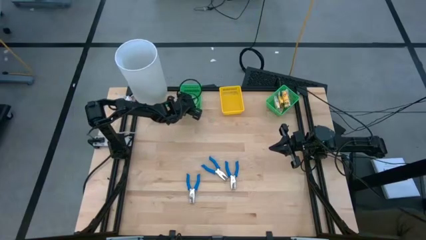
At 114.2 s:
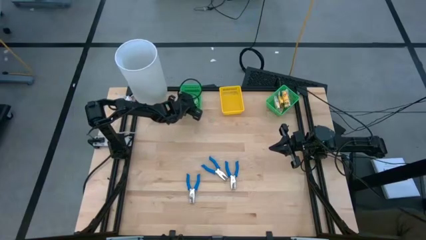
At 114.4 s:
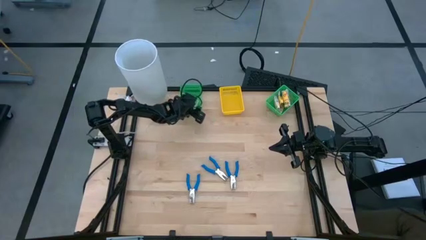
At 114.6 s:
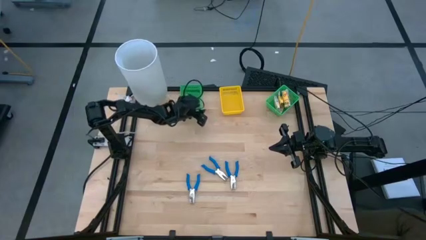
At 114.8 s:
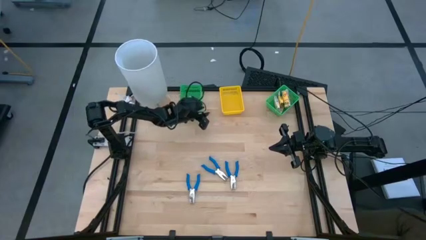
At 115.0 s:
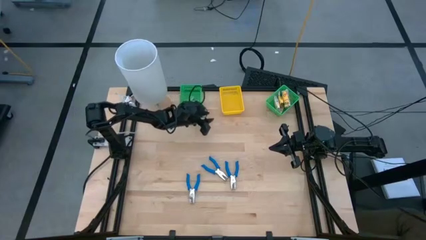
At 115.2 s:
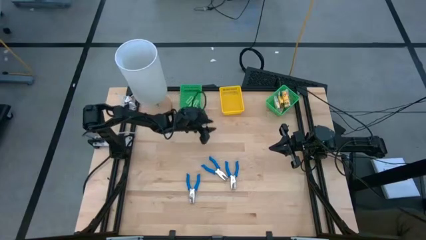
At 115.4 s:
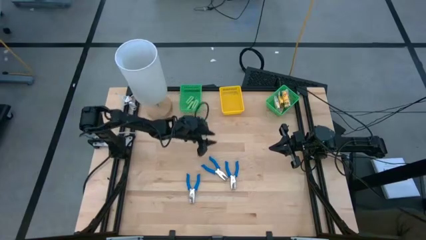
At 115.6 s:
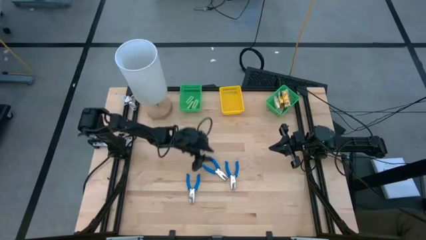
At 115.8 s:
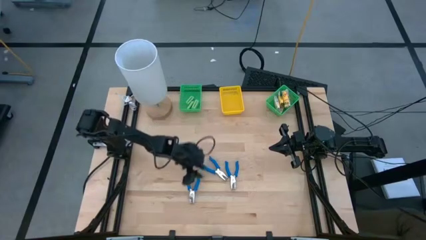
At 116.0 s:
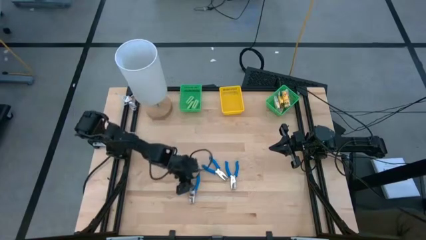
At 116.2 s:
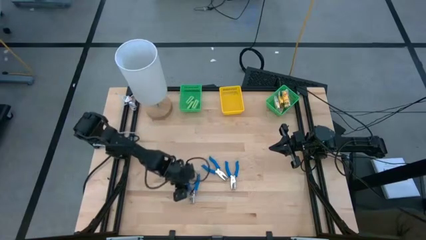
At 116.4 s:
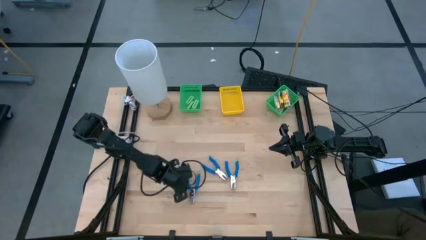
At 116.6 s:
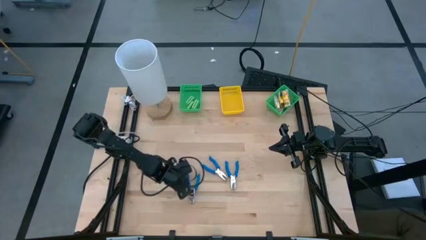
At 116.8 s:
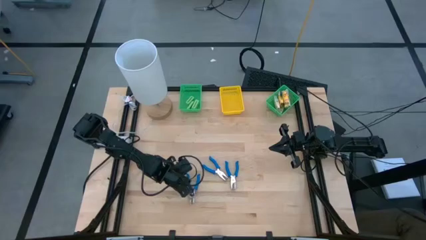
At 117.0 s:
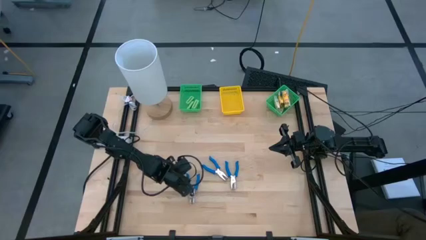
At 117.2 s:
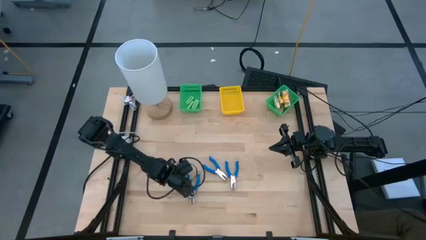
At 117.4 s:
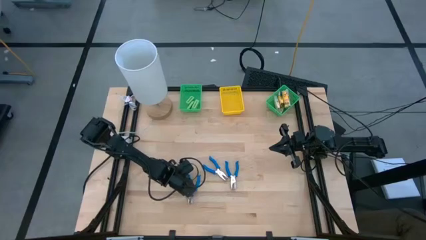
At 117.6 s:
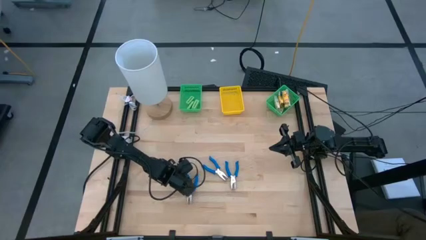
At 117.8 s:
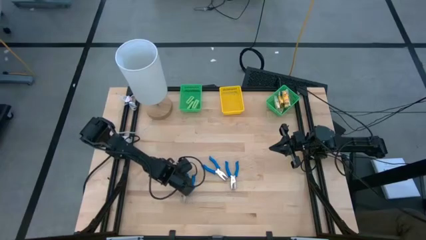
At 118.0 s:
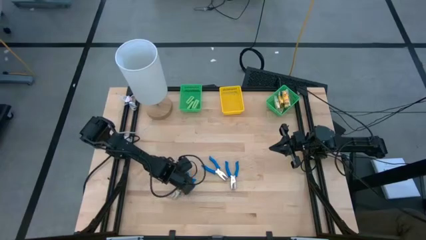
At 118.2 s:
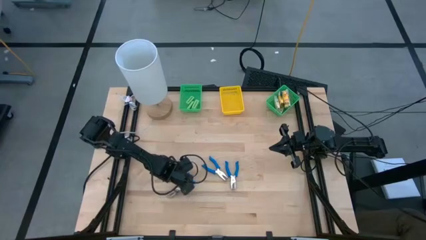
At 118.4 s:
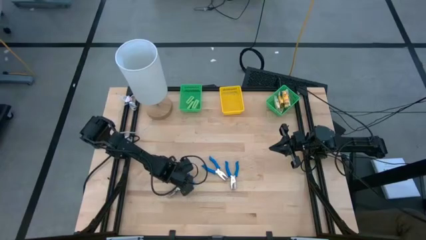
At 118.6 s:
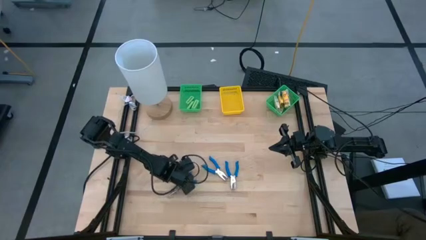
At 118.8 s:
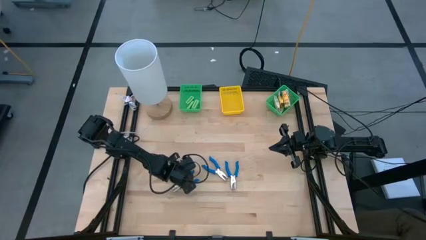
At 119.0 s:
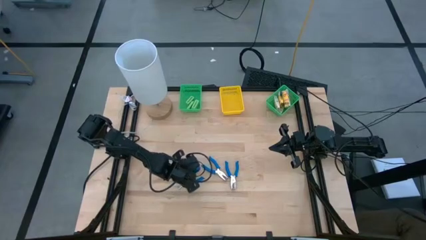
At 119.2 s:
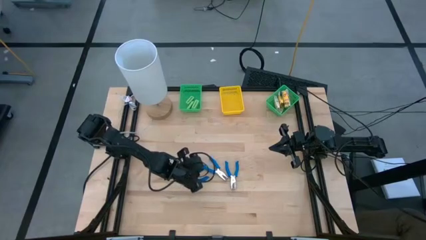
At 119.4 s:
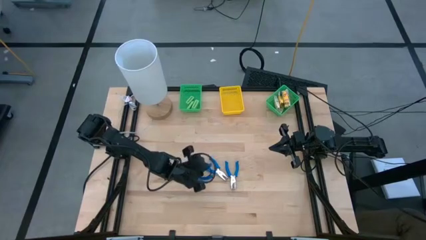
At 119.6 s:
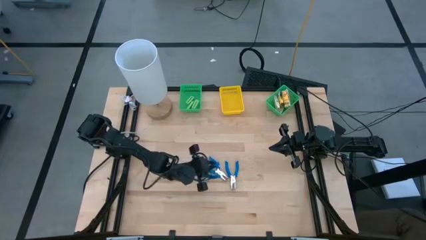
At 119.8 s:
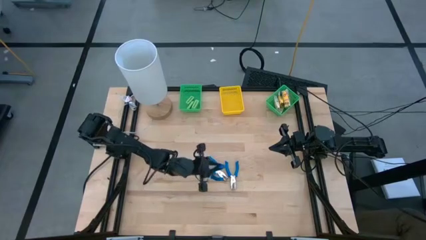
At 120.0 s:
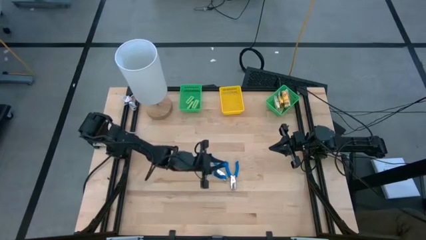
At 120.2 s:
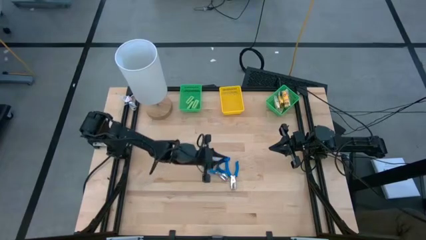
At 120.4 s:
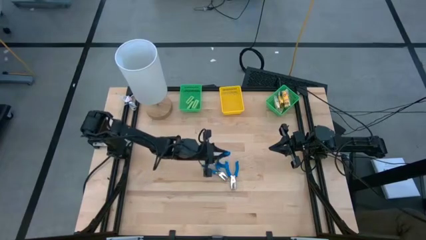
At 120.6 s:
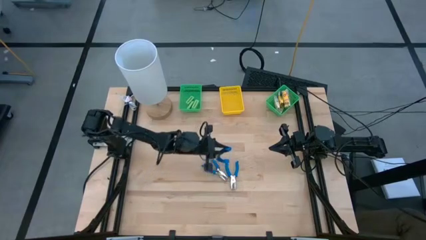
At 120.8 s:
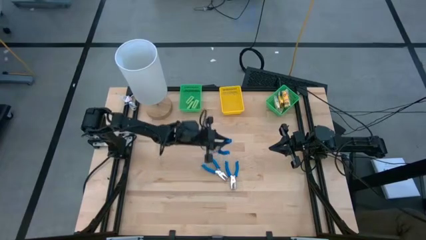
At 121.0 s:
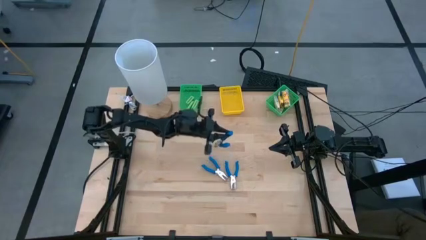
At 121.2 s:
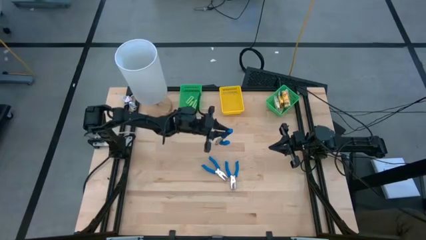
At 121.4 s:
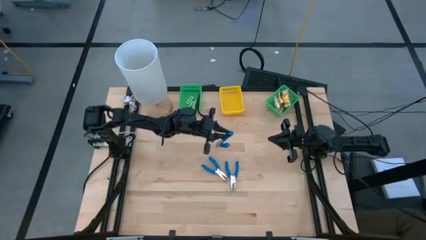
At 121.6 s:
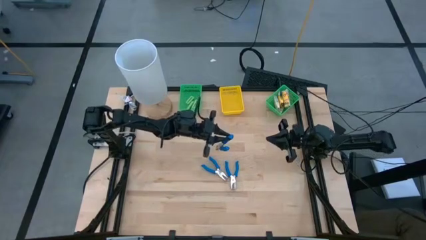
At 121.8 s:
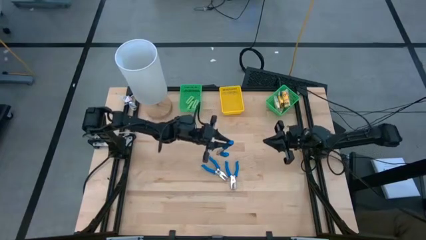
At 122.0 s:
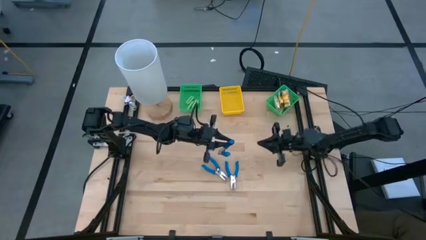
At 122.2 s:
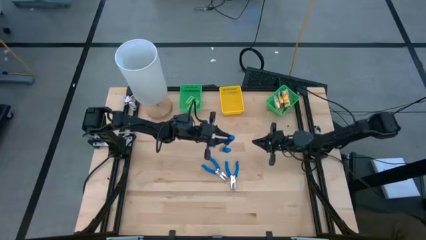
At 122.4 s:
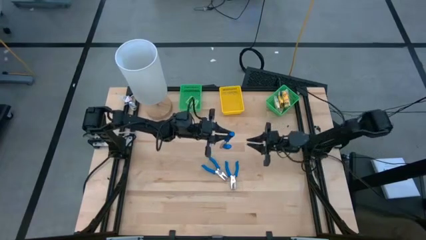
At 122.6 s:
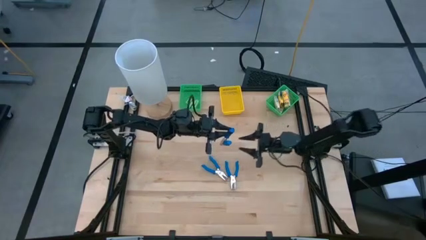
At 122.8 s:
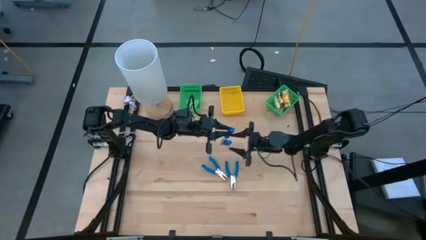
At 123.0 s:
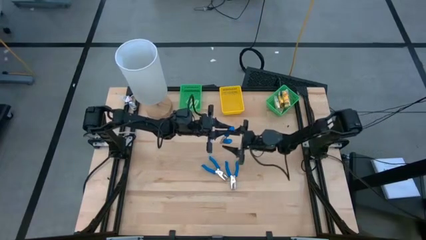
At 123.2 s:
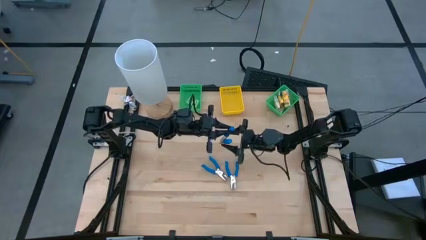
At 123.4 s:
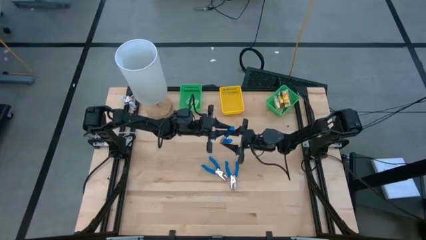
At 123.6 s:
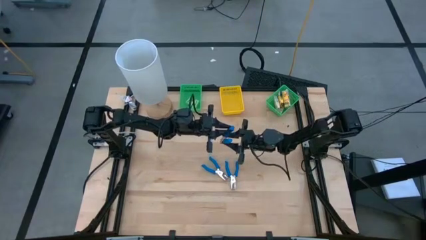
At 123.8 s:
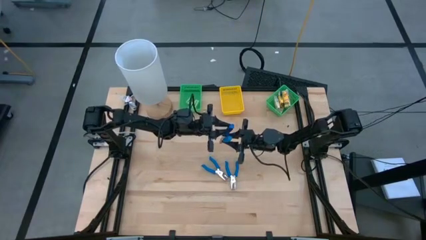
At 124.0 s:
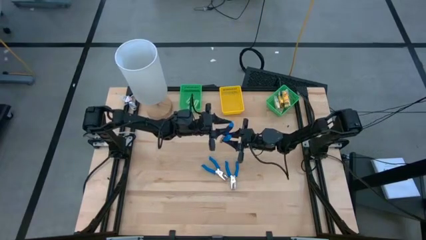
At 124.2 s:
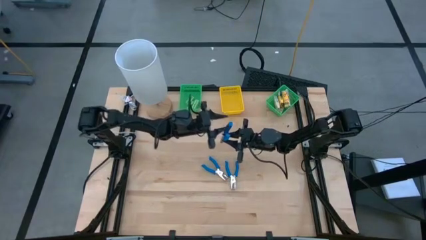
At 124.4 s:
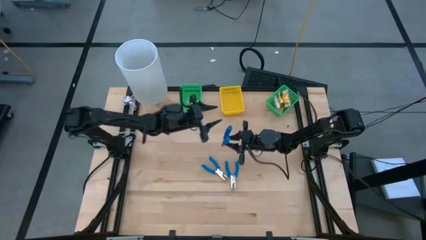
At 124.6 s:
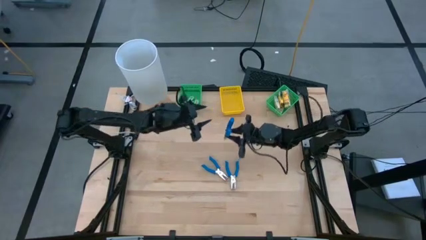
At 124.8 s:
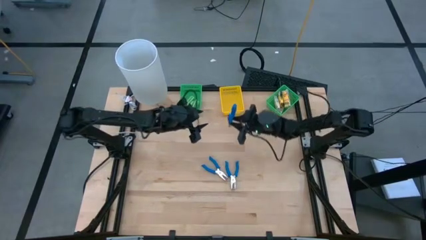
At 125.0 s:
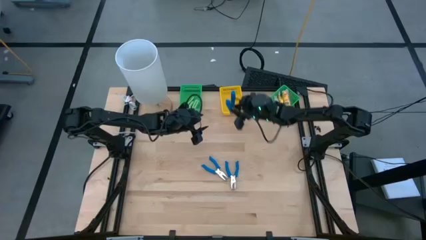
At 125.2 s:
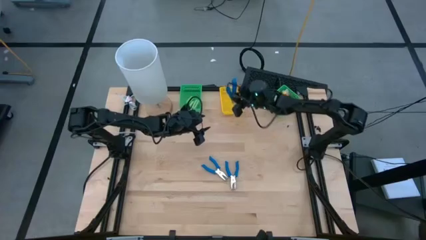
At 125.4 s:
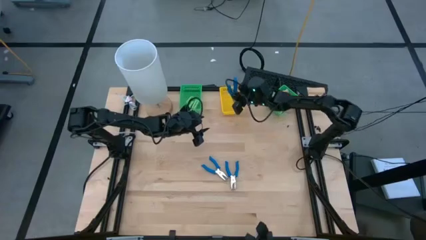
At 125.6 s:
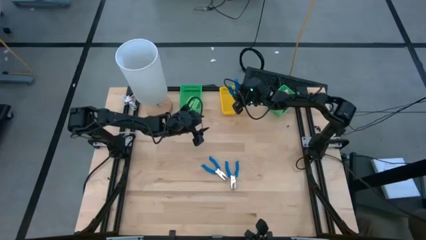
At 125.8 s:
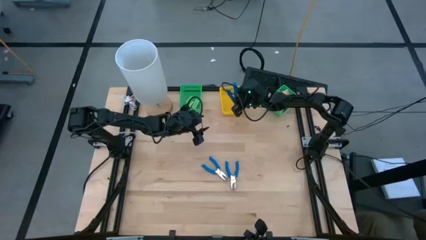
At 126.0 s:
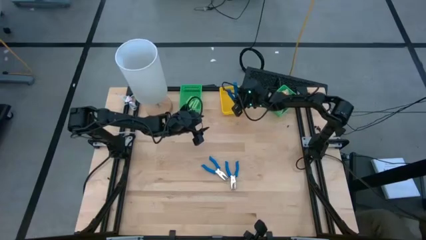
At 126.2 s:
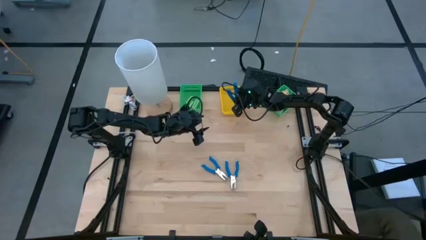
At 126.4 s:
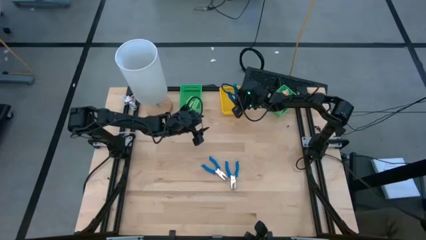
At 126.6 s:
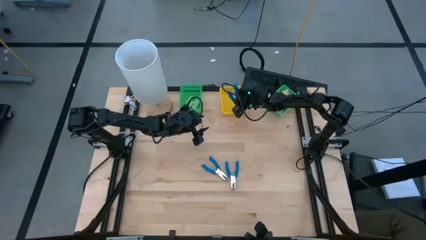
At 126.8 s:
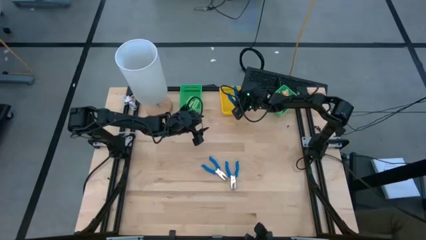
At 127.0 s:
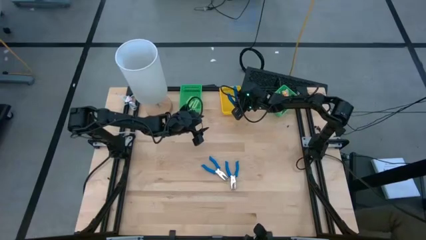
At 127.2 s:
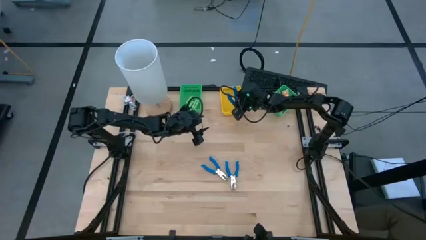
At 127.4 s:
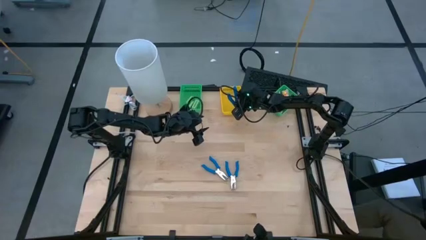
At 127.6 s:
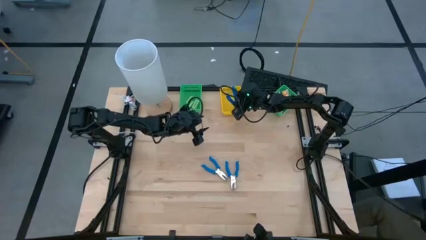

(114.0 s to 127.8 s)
Task: Pick & Place School Supplies
Put the blue puncher into the yellow bin

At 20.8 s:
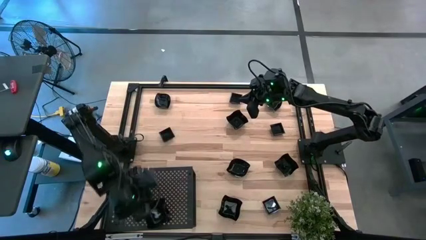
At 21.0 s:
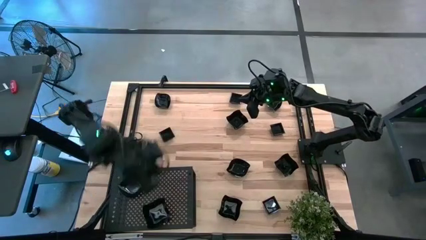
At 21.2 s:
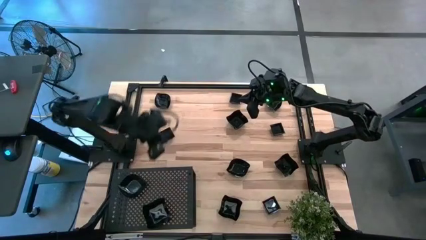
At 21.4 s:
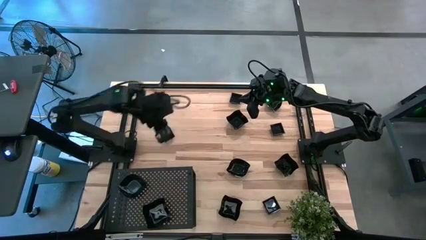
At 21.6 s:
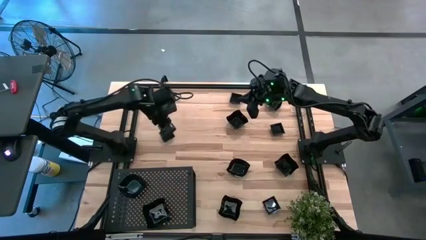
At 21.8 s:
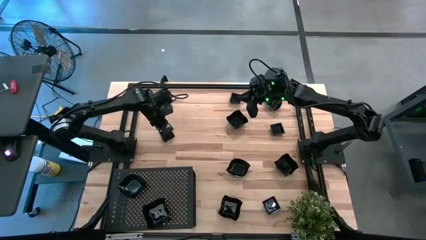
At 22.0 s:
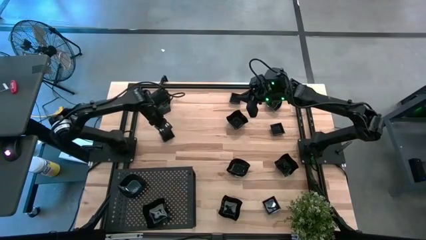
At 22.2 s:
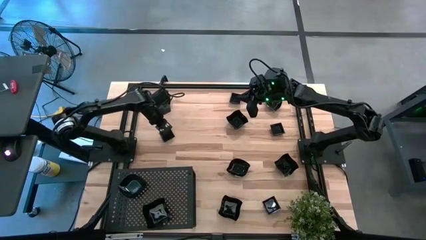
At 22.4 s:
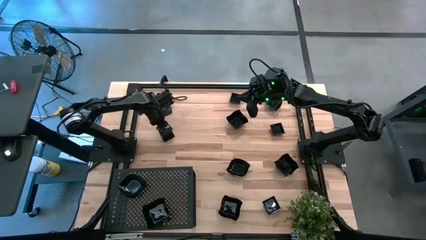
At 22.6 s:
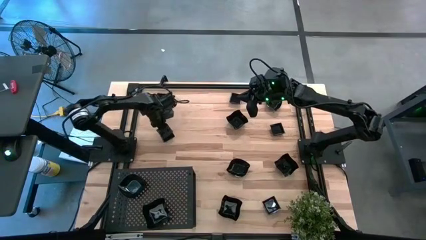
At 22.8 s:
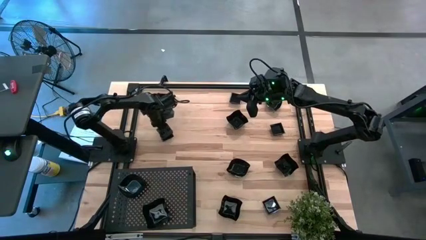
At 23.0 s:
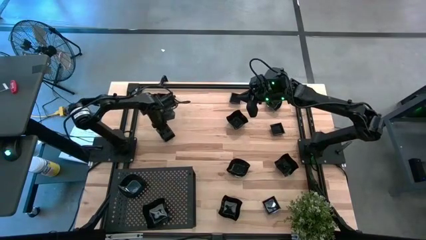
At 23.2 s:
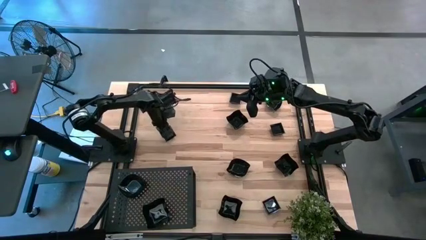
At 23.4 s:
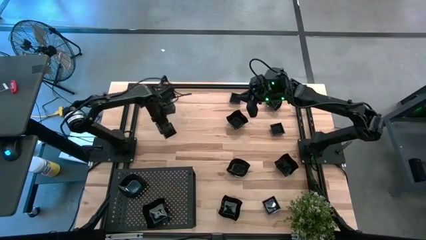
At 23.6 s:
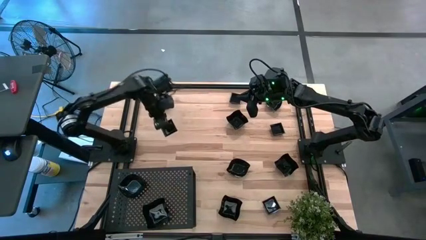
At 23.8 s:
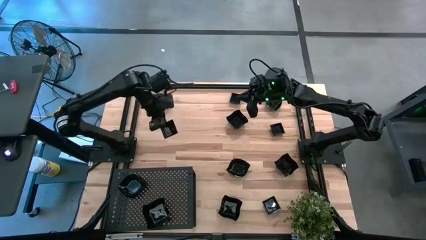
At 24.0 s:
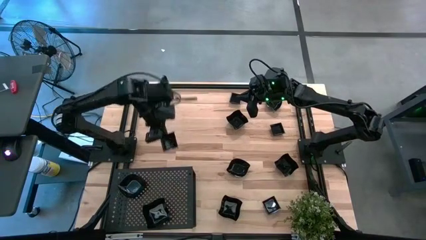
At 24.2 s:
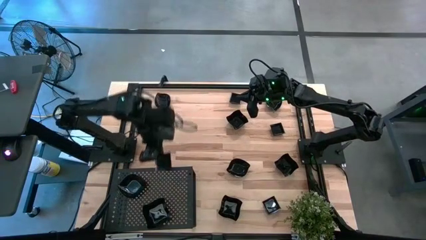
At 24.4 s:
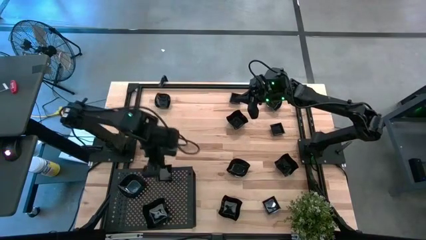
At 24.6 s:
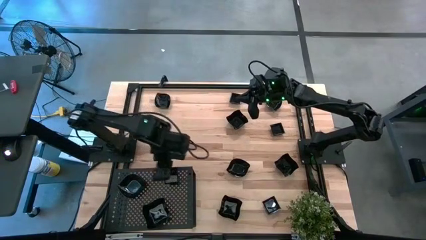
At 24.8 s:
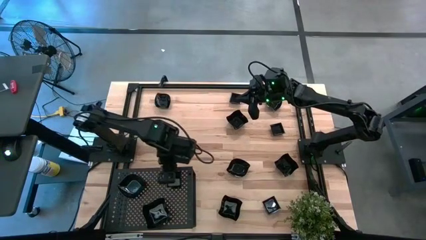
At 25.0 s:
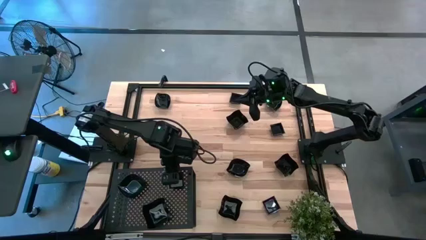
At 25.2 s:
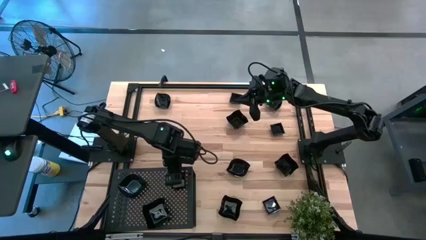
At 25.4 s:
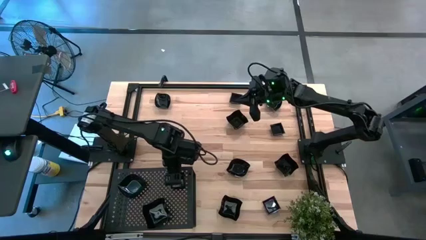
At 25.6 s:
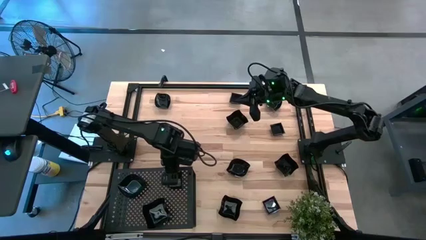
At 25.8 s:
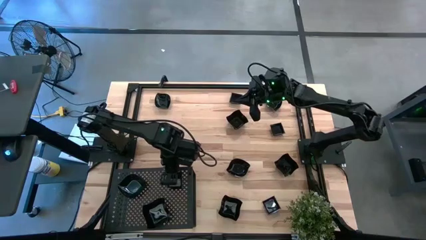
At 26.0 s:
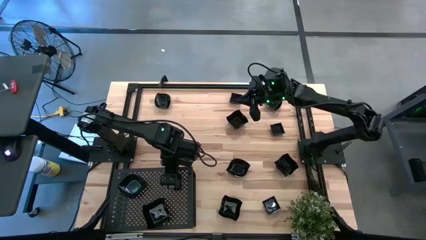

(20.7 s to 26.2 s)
Task: Pick & Place Mini shaped plates
Put the square plate on the shelf
